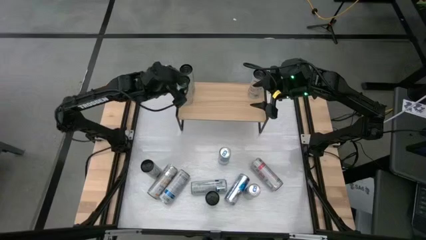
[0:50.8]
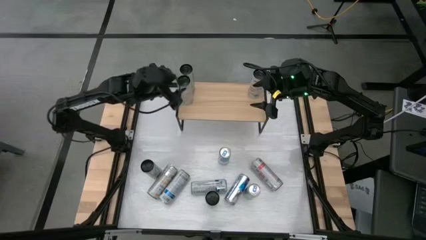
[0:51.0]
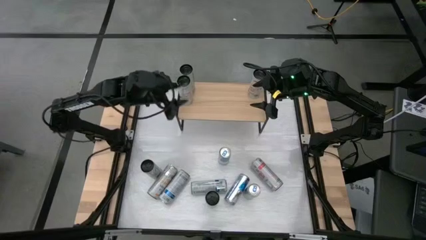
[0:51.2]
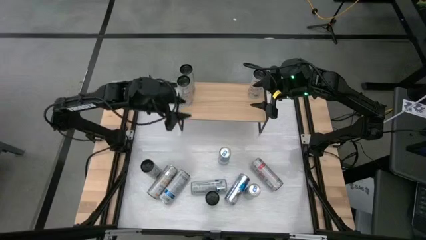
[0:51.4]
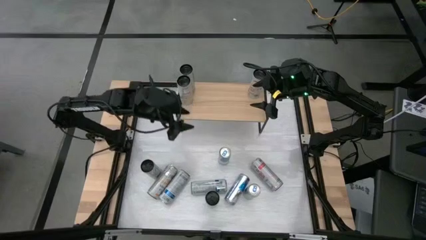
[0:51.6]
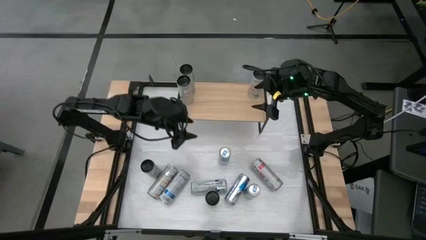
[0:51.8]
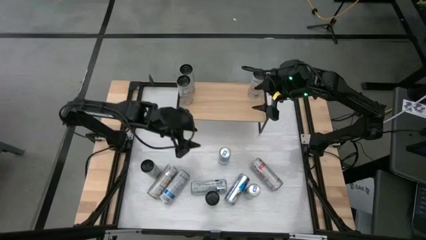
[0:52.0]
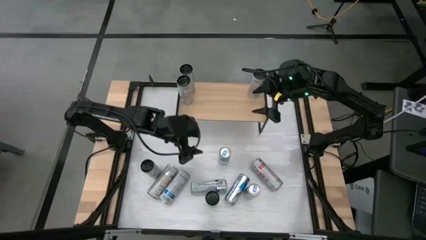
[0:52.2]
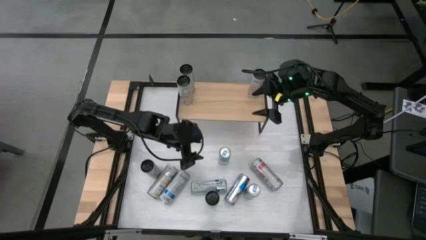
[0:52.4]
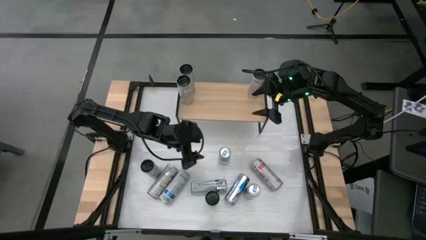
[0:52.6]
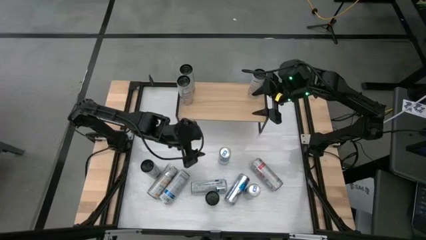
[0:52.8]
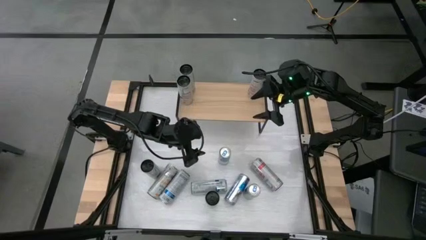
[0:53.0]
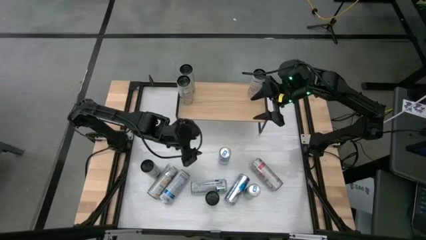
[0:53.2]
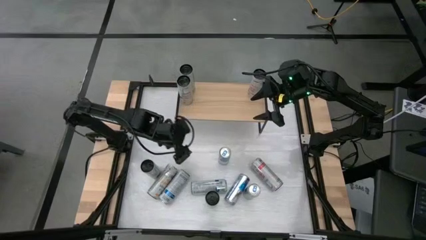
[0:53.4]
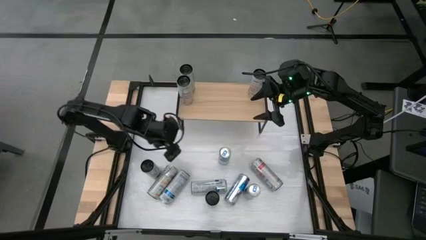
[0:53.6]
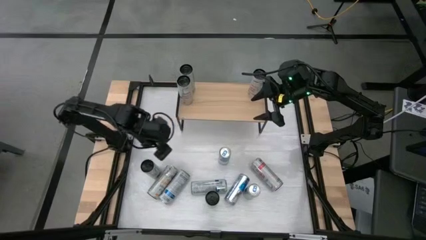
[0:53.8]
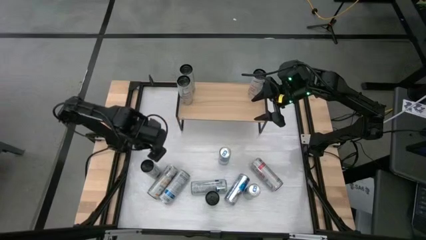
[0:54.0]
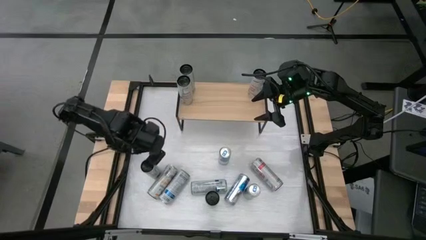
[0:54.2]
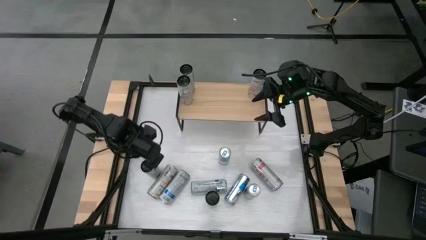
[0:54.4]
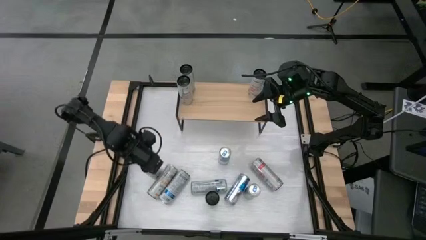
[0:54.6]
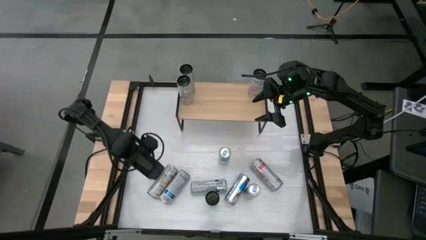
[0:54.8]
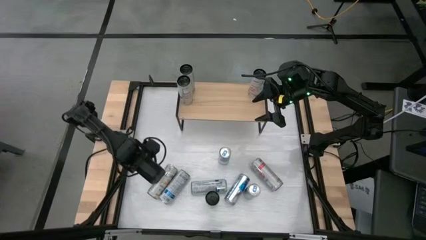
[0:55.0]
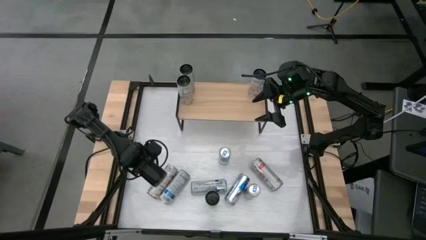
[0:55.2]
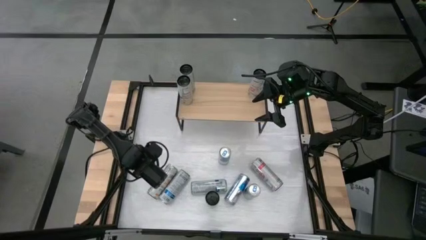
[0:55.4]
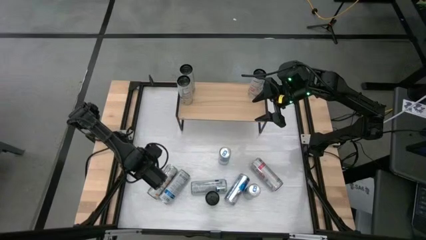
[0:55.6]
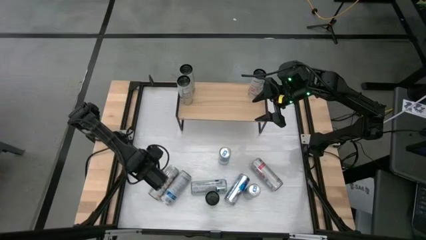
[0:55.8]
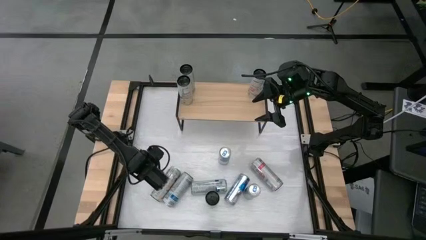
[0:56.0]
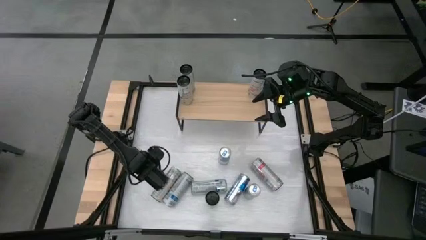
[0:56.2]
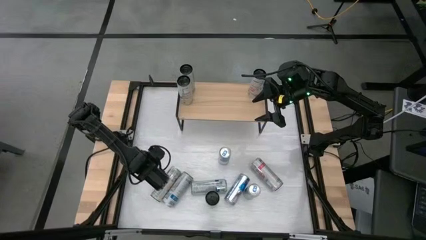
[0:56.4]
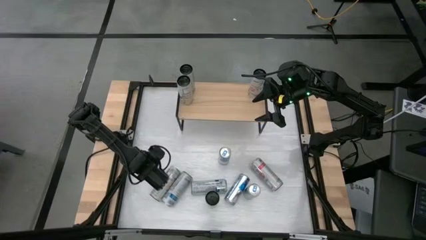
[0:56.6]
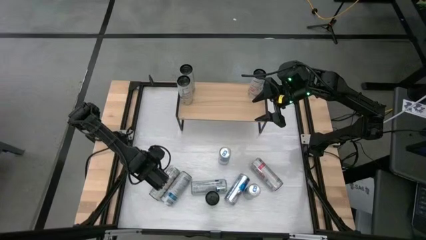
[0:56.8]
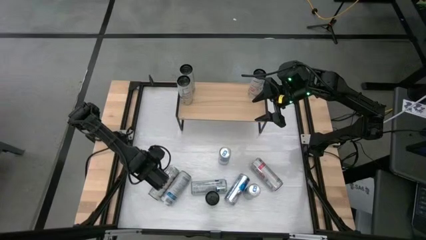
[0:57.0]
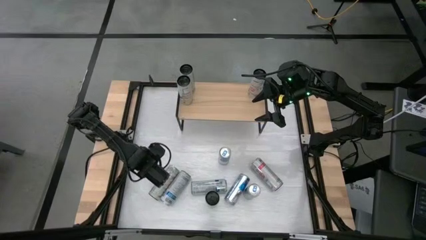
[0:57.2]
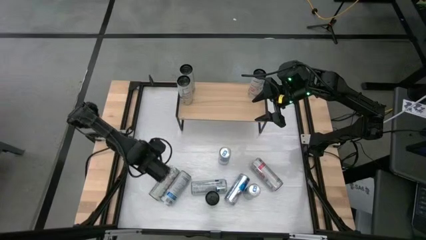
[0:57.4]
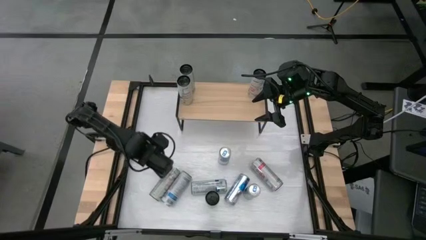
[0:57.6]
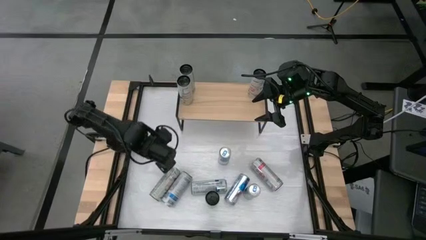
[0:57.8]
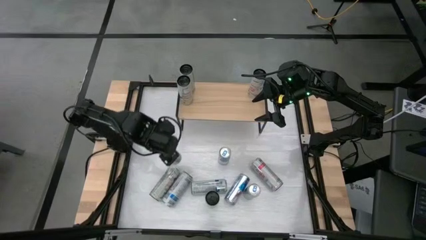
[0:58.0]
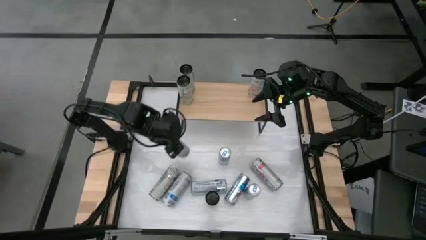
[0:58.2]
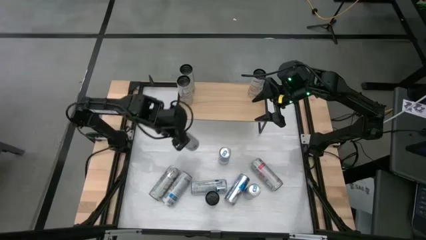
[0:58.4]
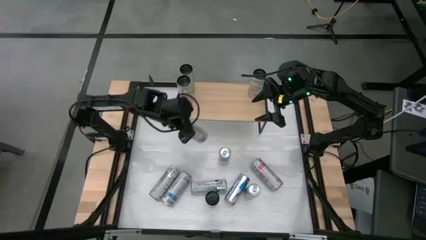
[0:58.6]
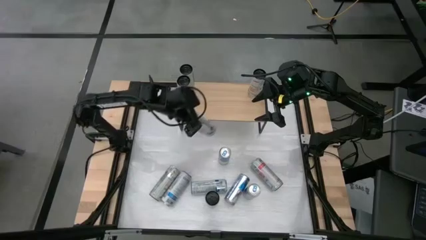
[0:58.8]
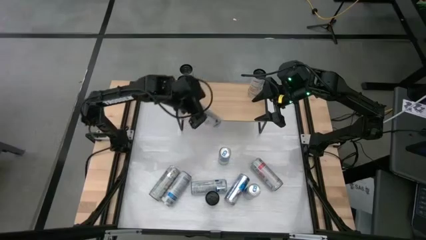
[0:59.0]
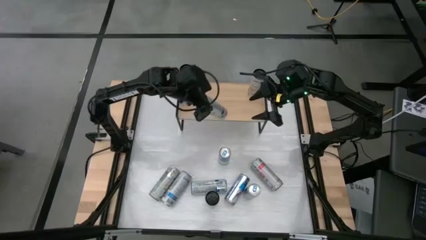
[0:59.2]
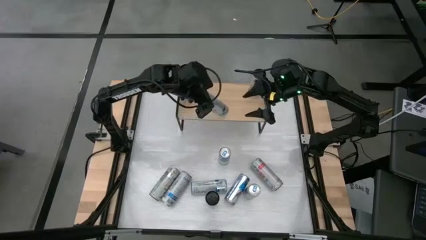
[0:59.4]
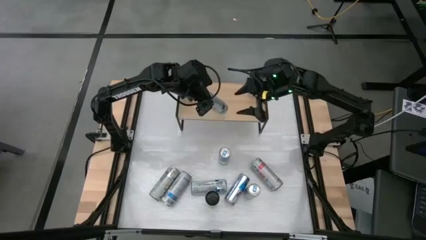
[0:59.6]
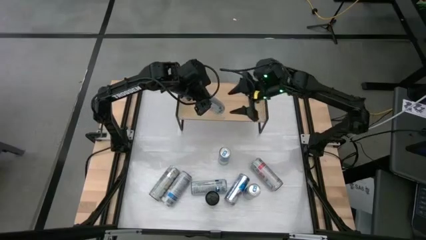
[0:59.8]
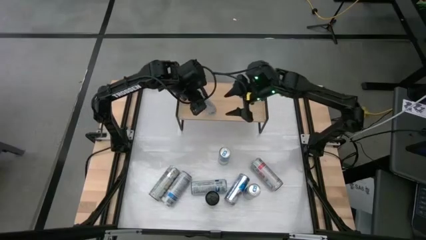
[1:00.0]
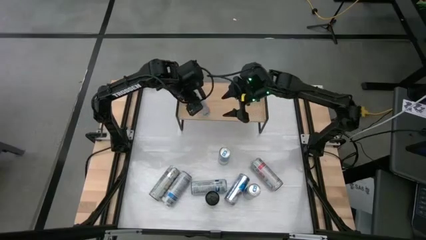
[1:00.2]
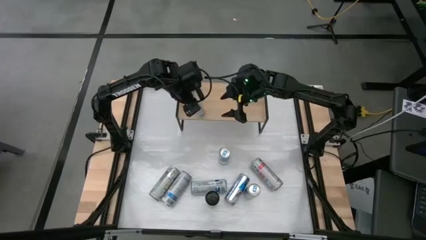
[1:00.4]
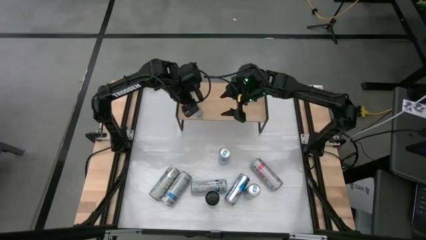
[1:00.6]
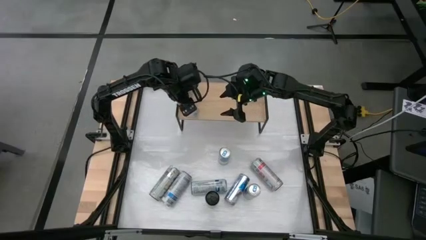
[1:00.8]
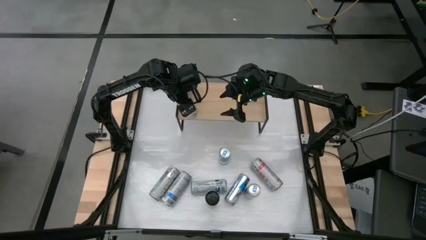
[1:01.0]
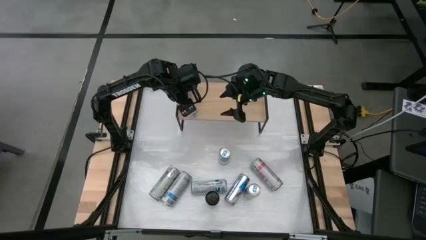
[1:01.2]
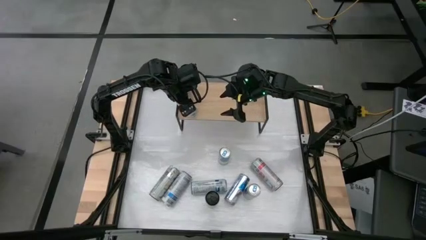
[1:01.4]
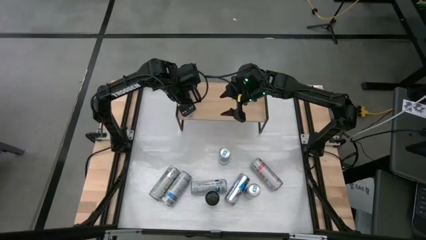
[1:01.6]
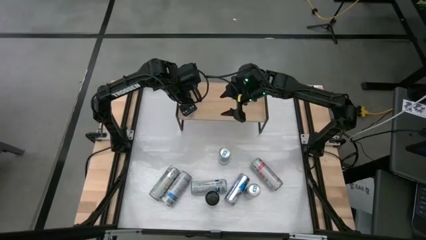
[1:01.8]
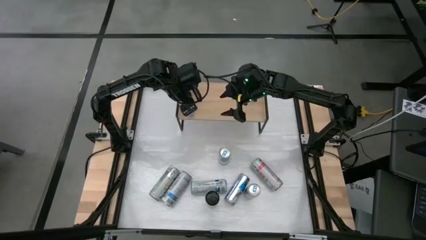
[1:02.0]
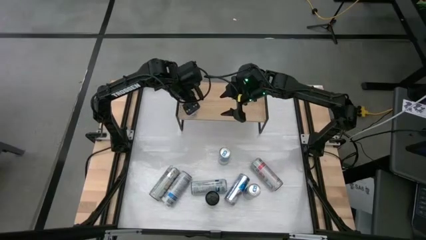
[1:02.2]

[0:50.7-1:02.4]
Task: Sort soda cans
Put the left white pink soda can on the shelf and align with other white pink soda cans

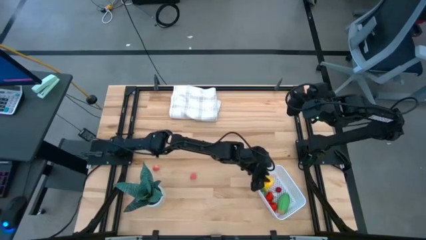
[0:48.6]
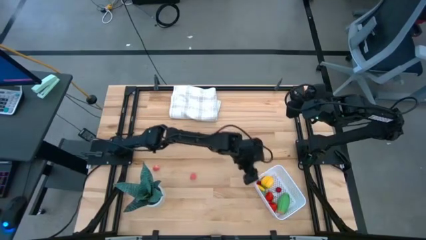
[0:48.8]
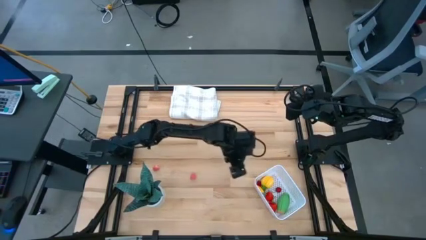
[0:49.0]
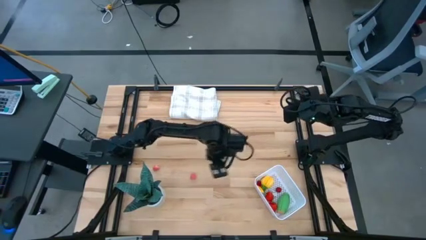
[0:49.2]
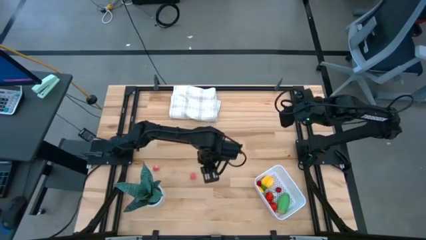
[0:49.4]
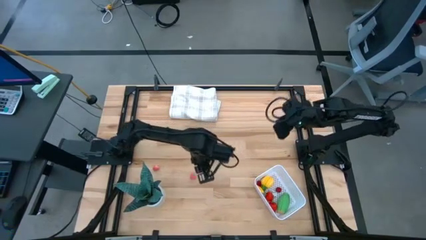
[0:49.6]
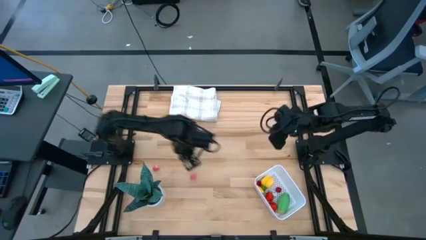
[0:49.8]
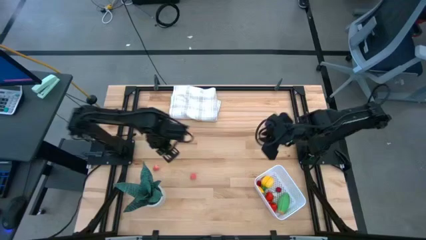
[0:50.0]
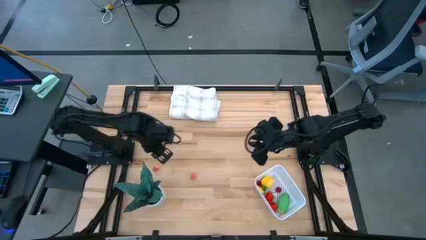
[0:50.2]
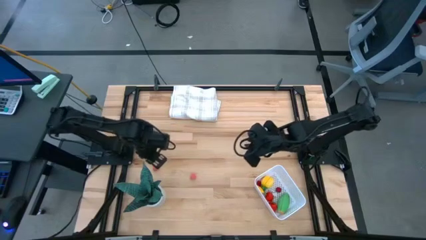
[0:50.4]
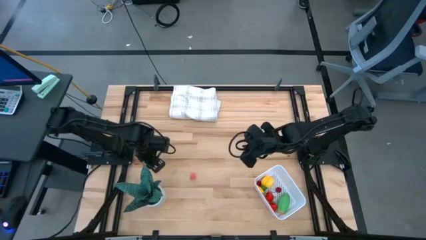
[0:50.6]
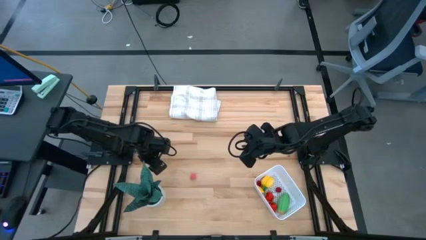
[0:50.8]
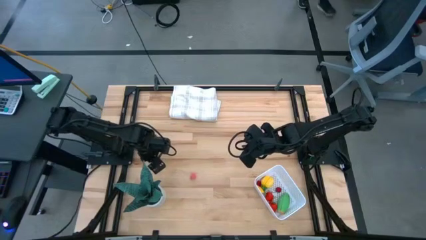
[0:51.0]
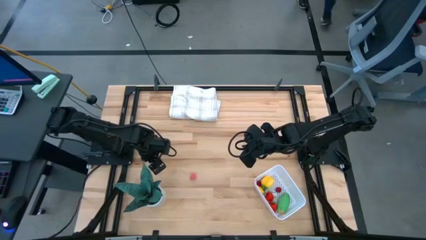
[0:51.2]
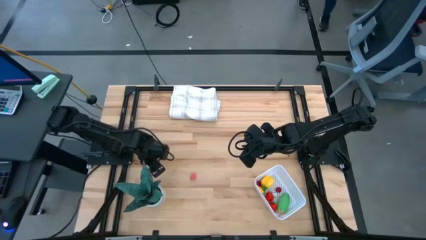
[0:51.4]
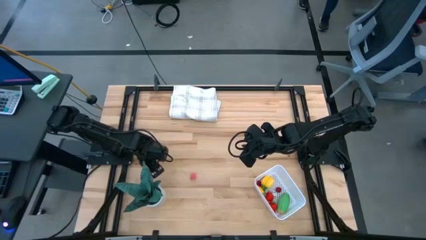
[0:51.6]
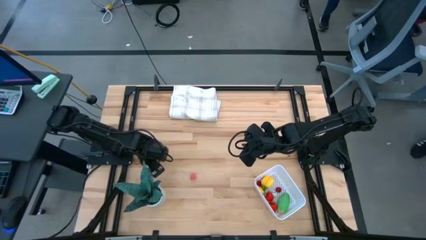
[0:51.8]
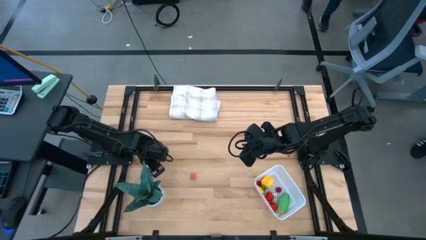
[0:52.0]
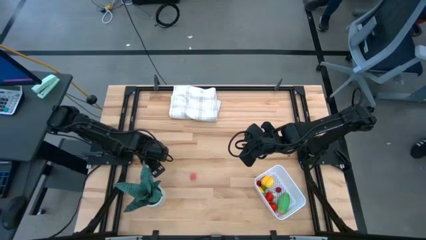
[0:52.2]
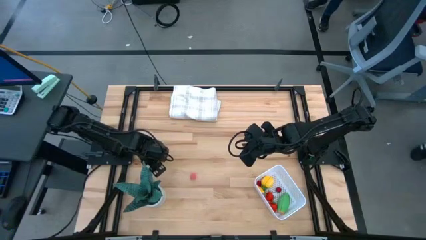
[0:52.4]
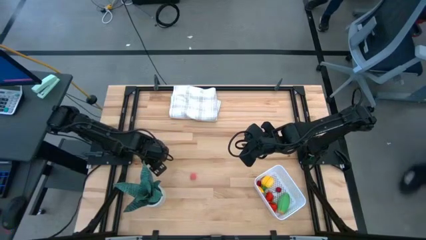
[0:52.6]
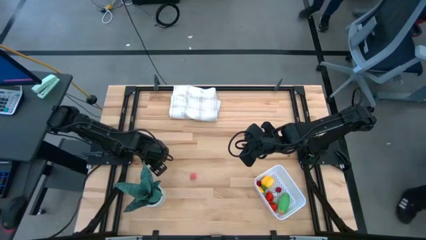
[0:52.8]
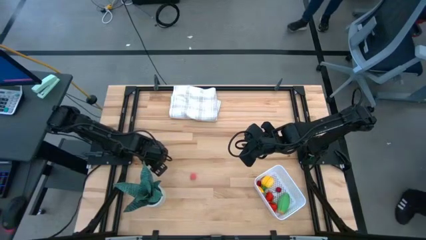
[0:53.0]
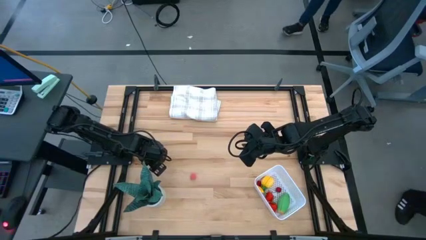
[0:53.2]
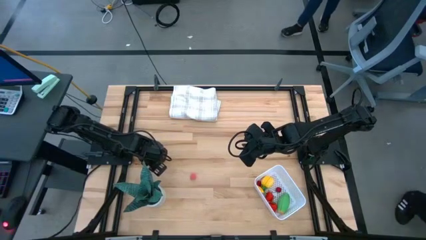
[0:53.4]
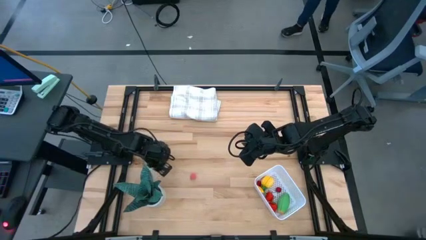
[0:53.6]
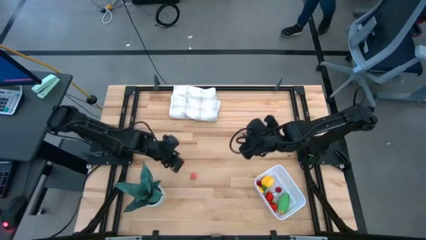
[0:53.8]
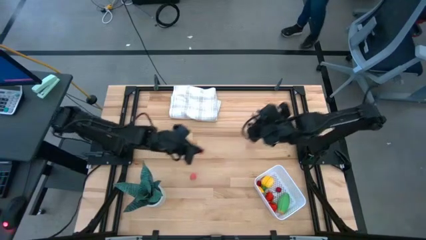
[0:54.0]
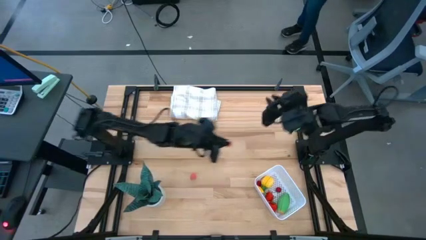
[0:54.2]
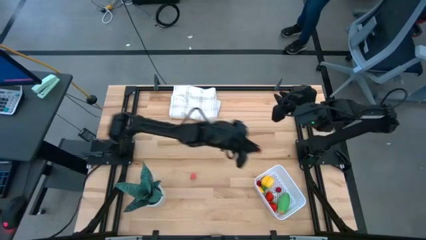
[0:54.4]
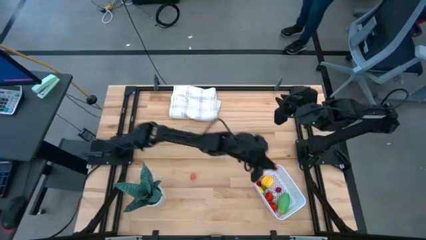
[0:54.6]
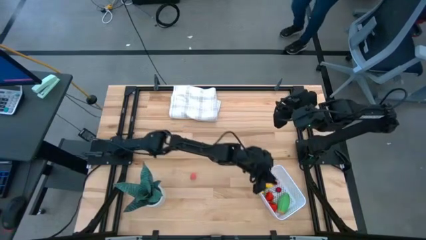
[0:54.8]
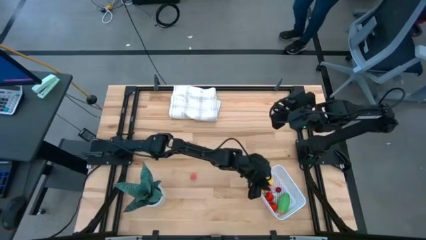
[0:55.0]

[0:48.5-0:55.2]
Task: Pick and placing Produce into tupperware
Put the left peach into the white bin
